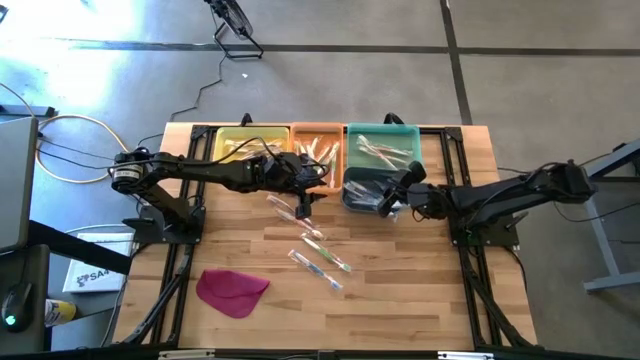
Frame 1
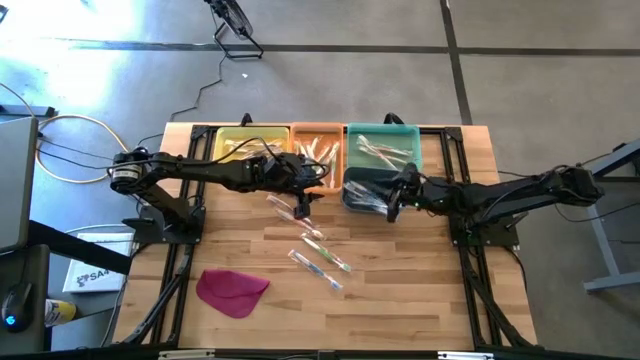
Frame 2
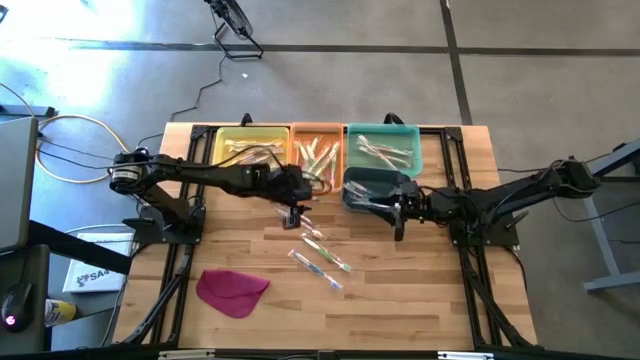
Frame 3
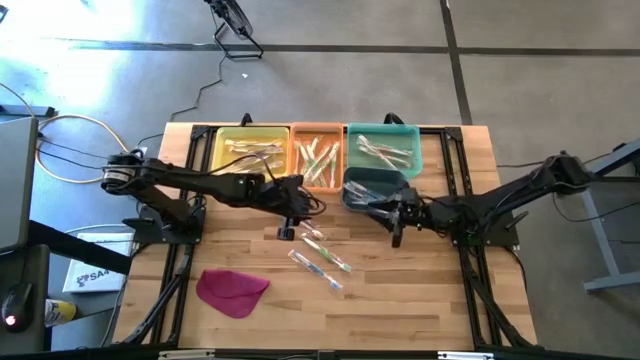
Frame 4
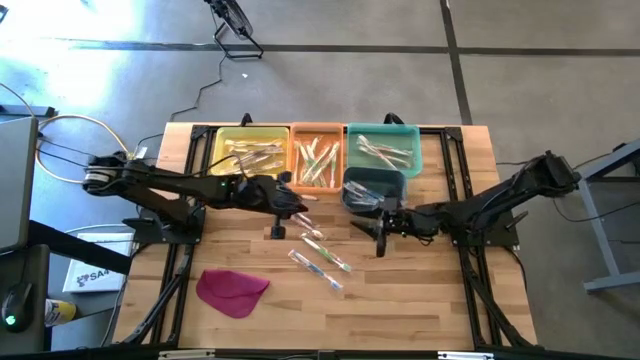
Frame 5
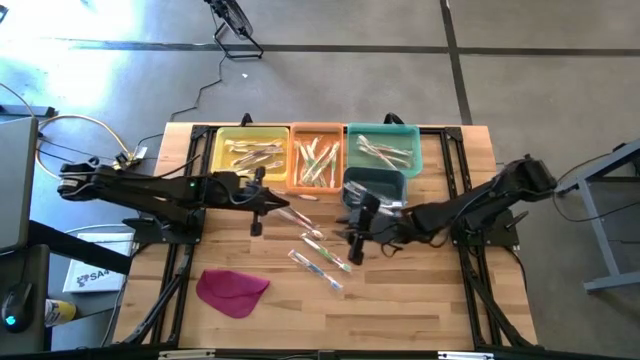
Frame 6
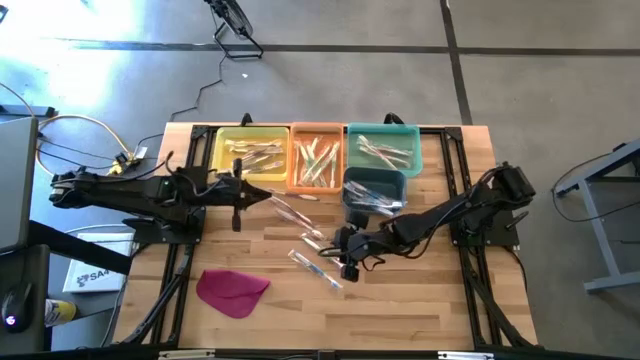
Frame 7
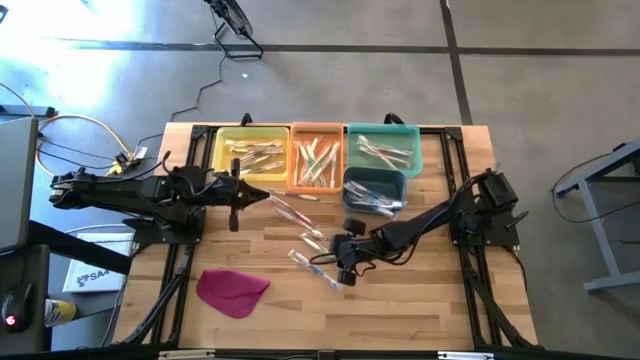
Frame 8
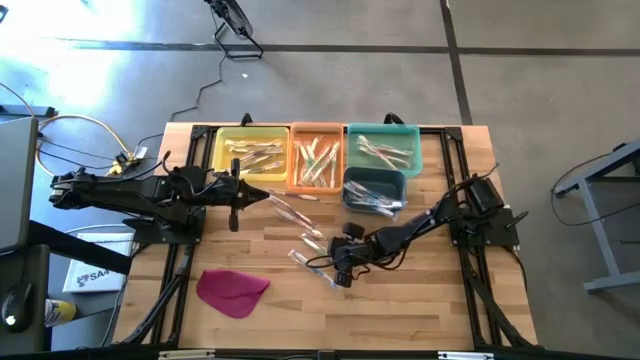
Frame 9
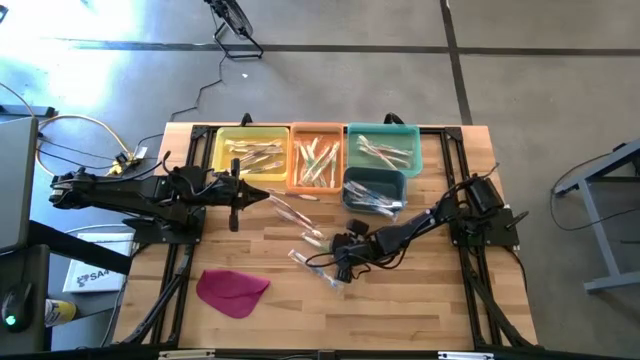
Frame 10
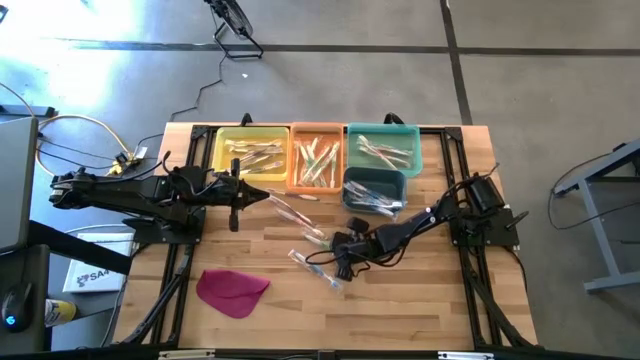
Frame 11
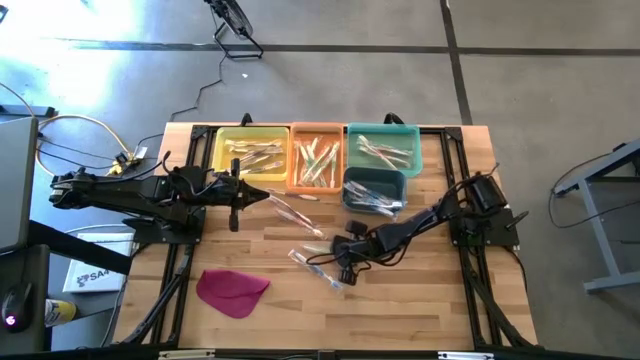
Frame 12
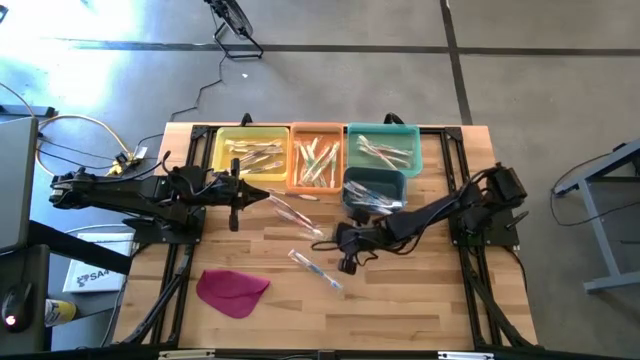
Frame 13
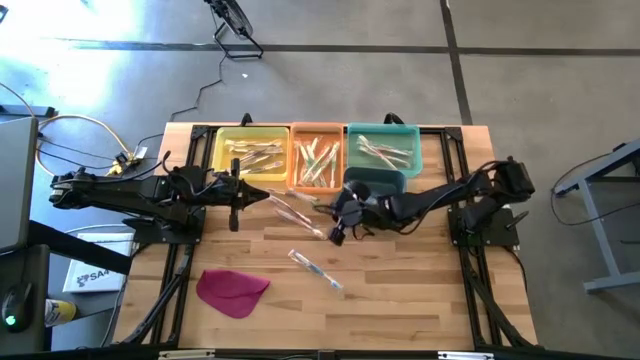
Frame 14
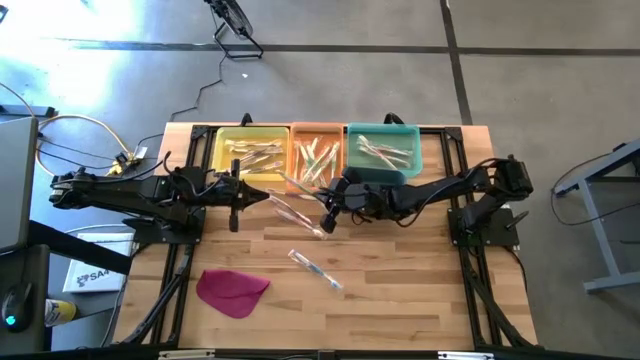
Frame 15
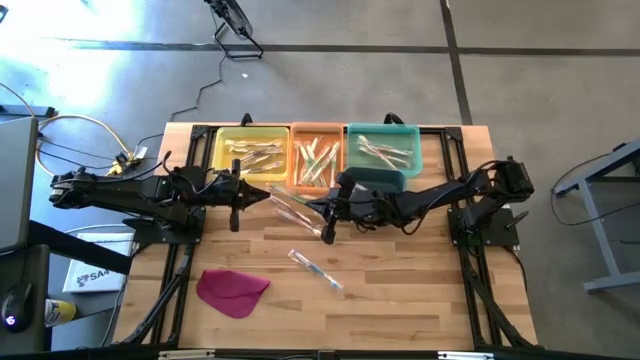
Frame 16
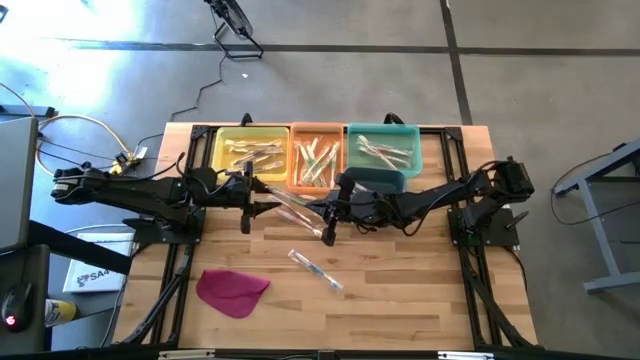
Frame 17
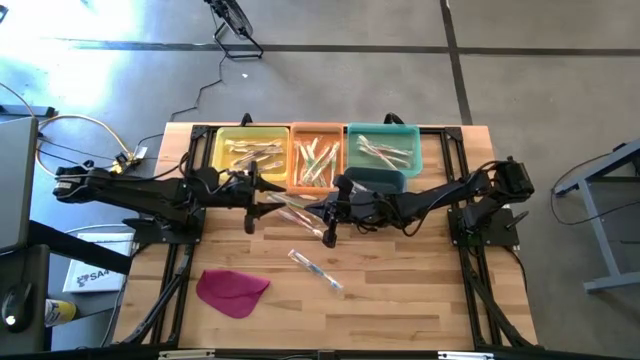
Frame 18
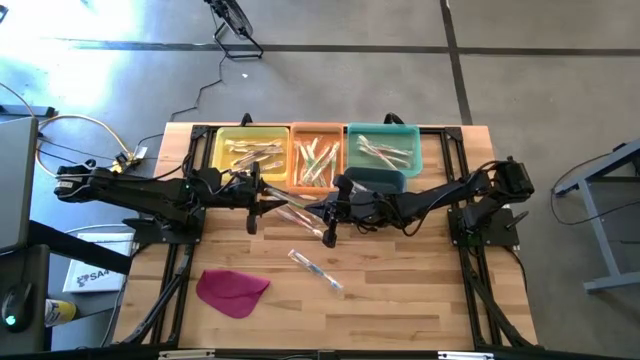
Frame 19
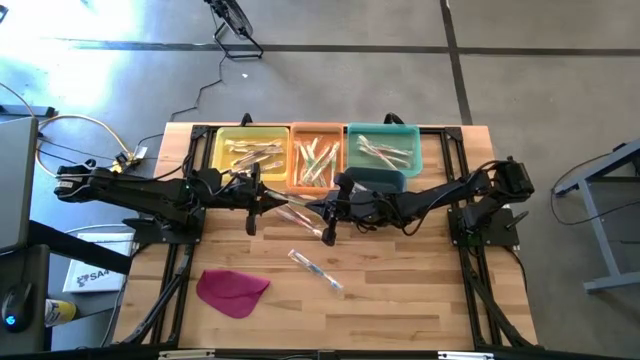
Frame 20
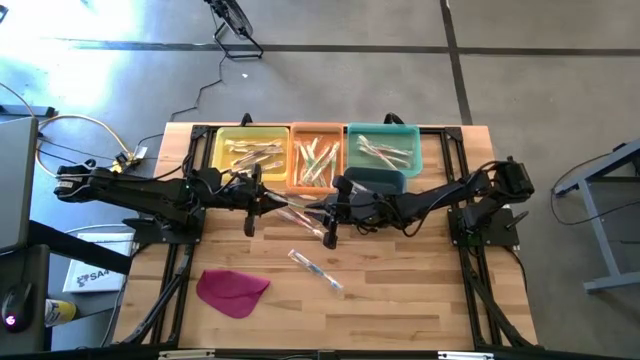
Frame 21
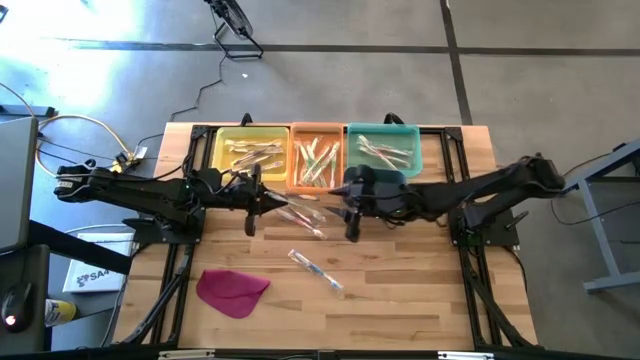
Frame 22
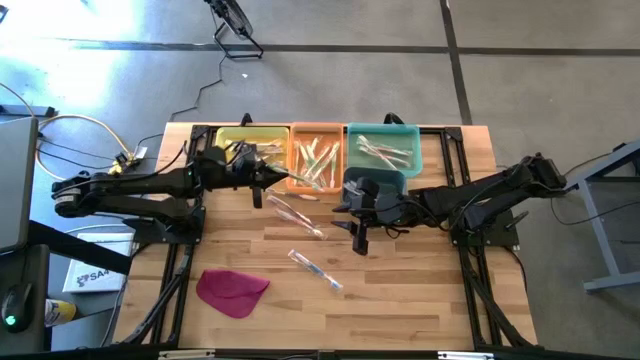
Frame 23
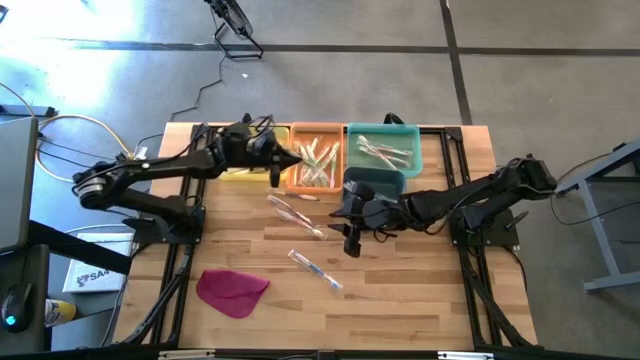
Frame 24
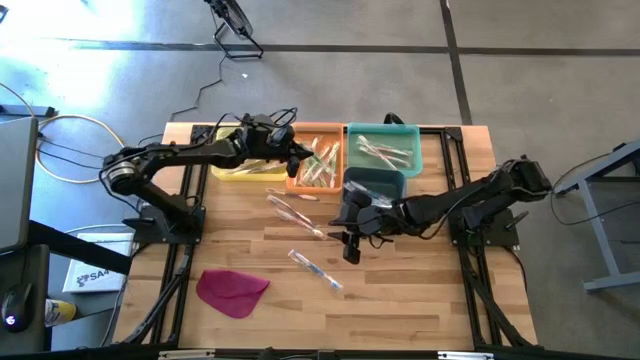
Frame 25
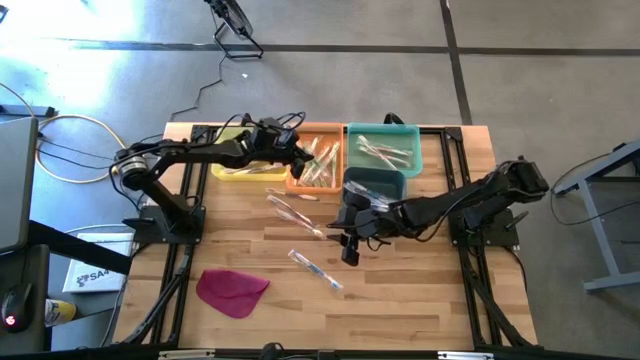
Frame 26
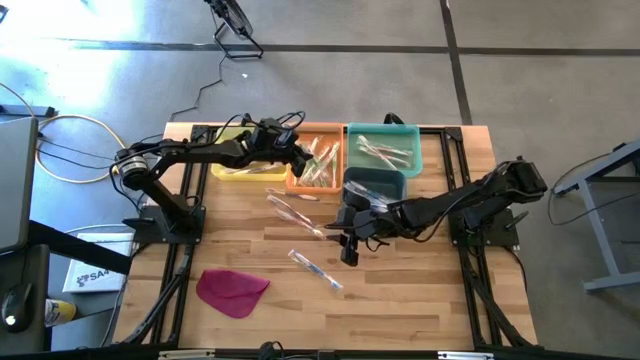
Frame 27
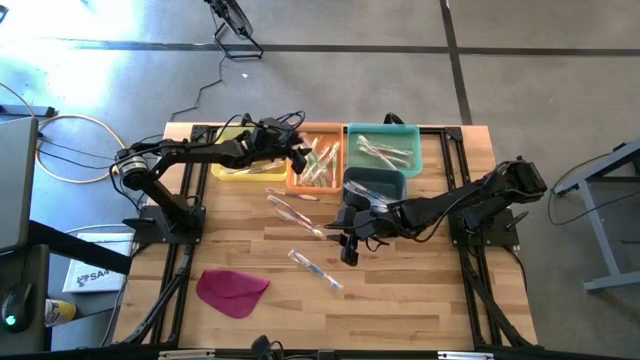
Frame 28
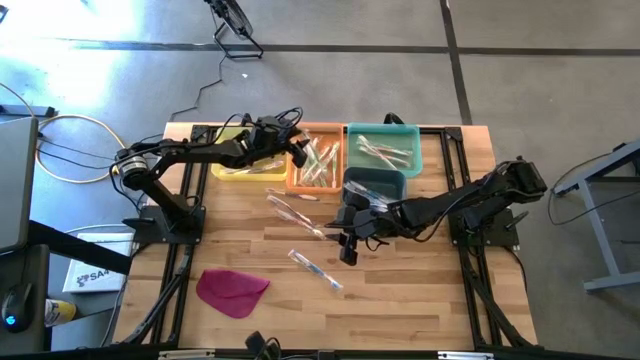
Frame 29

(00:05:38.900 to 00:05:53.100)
Task: Pick & Place Toothbrushes
Put the green toothbrush into the orange bin

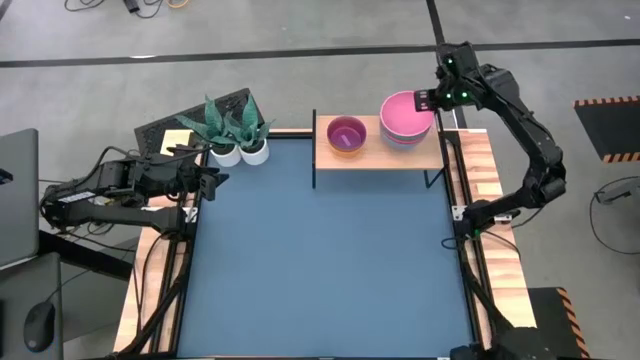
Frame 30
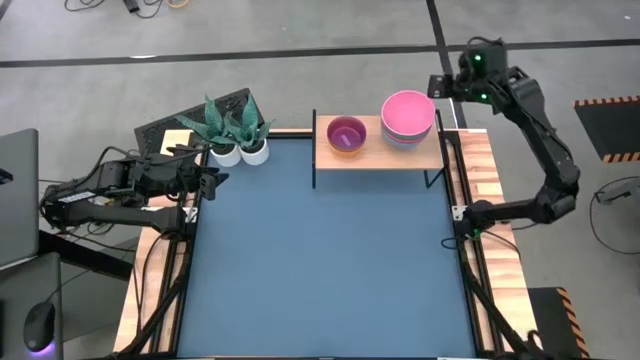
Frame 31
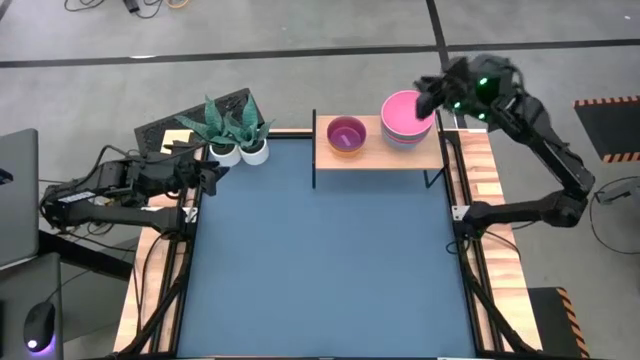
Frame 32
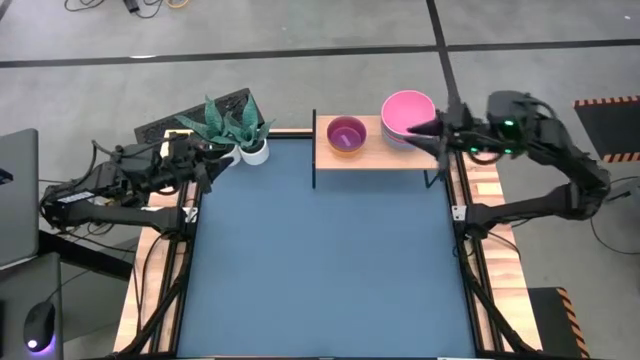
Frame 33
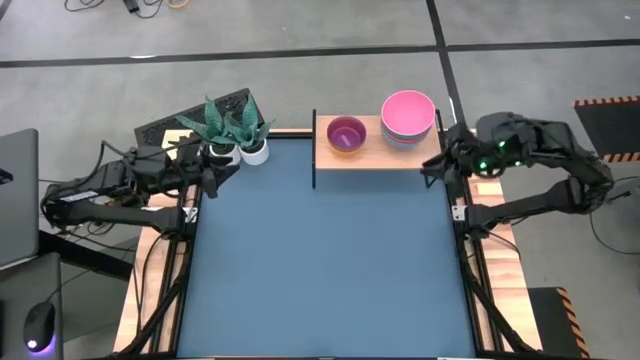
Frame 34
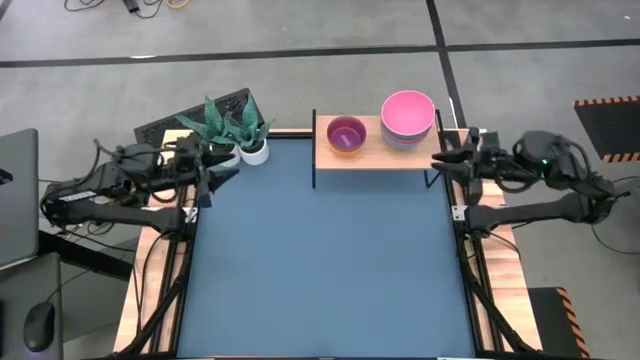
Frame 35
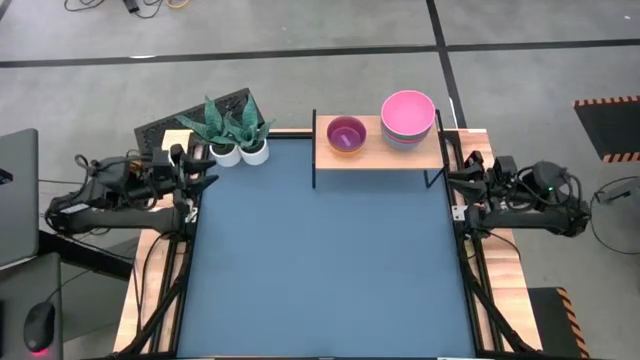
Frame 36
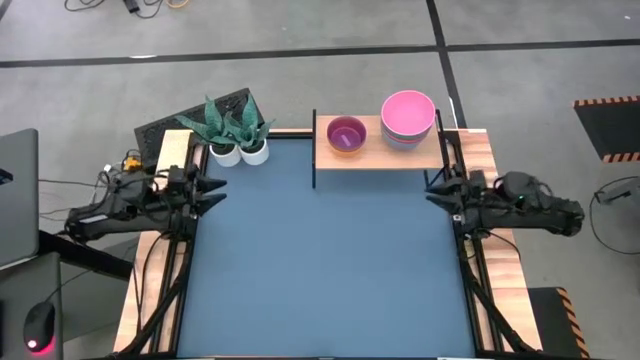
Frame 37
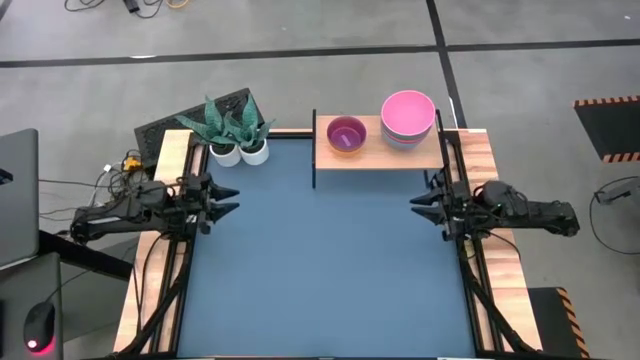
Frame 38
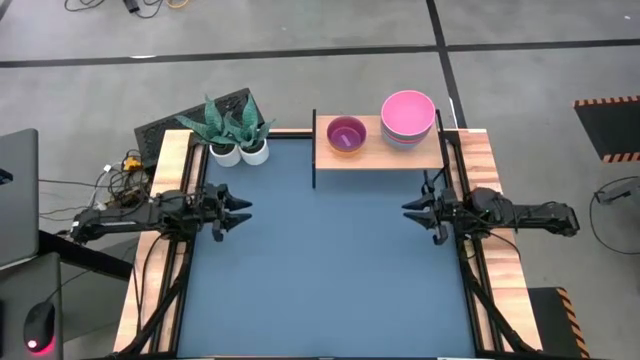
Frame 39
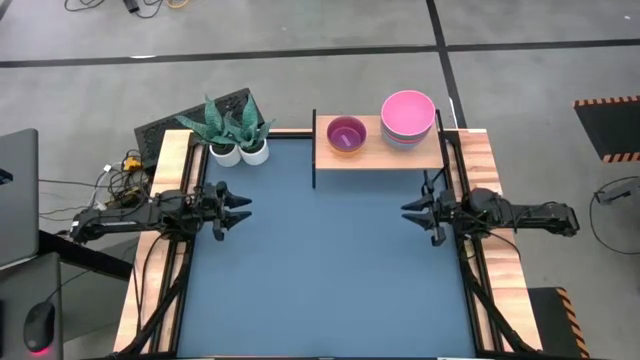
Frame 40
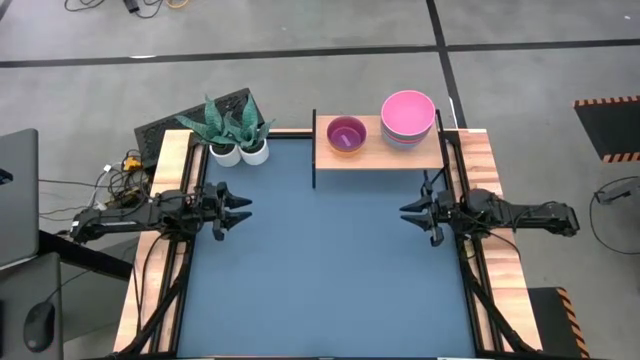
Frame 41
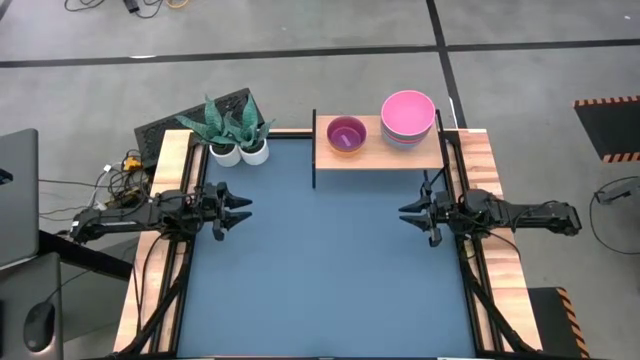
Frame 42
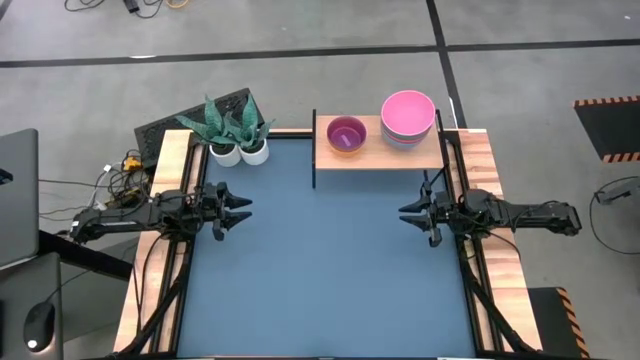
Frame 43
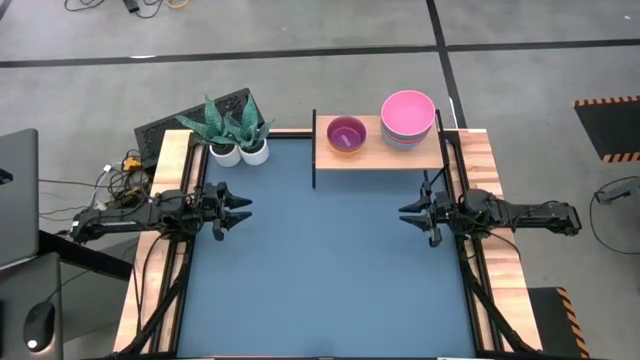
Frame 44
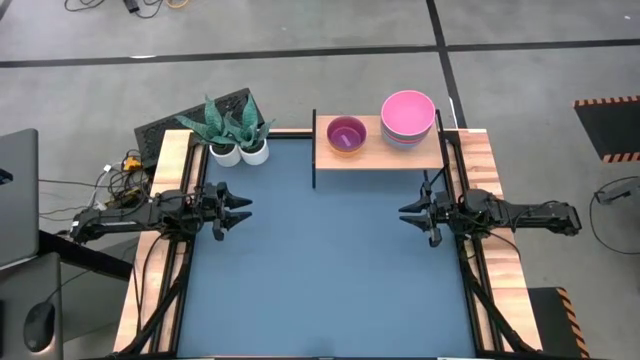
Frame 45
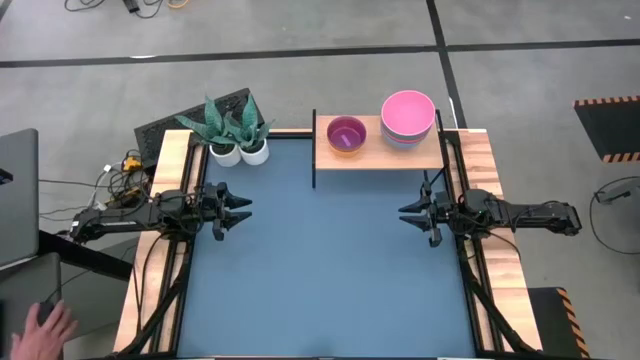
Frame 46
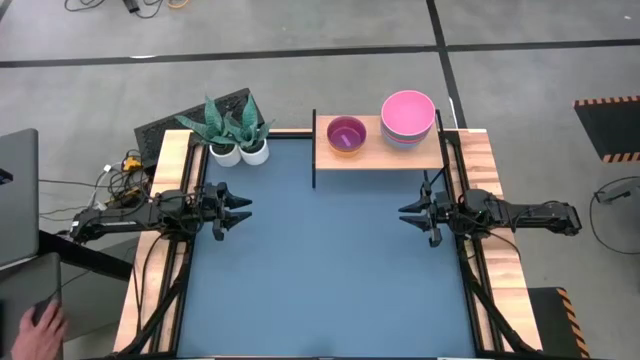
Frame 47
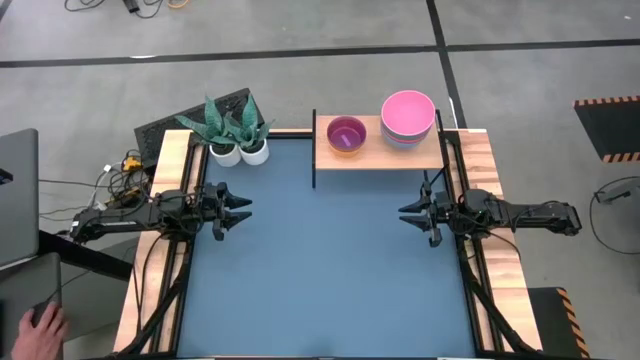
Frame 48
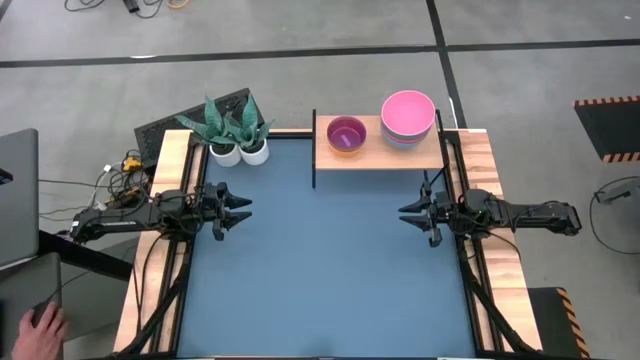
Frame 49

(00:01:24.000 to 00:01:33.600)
Task: Place and stack bowls onto a shelf
Return to Home Position
